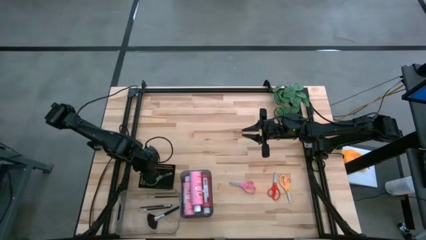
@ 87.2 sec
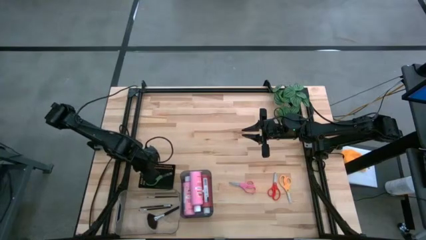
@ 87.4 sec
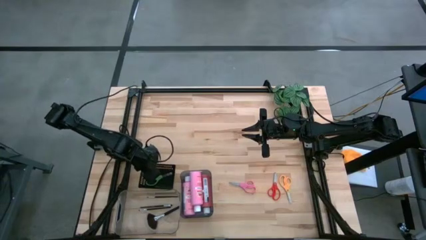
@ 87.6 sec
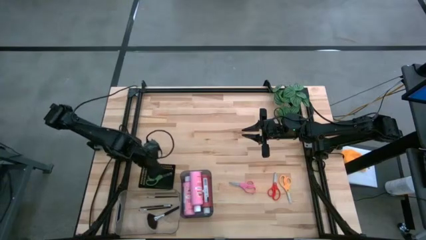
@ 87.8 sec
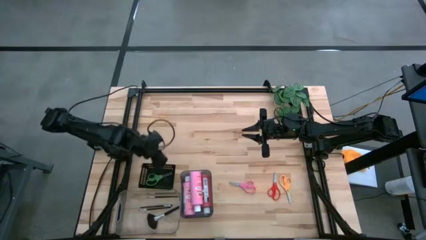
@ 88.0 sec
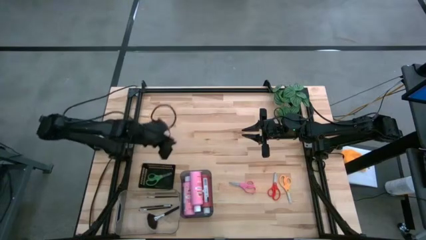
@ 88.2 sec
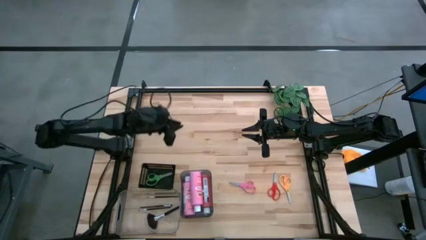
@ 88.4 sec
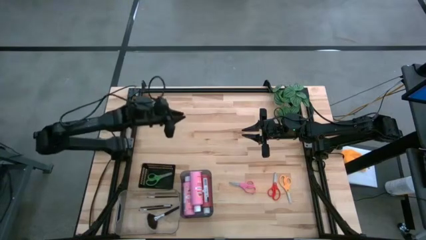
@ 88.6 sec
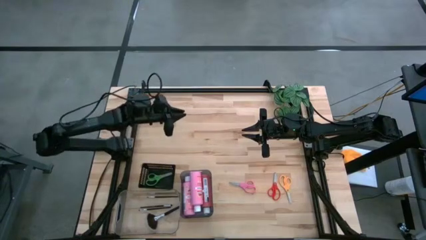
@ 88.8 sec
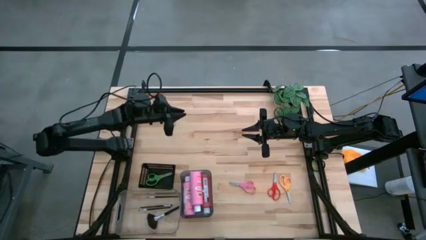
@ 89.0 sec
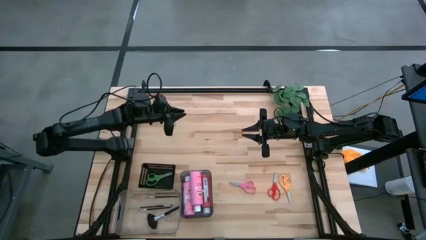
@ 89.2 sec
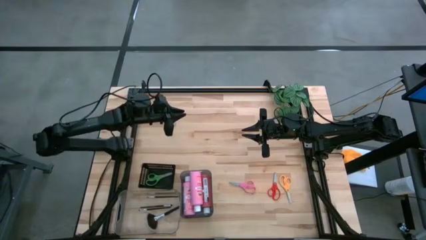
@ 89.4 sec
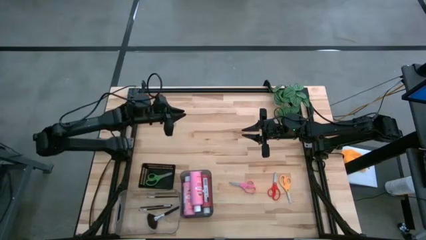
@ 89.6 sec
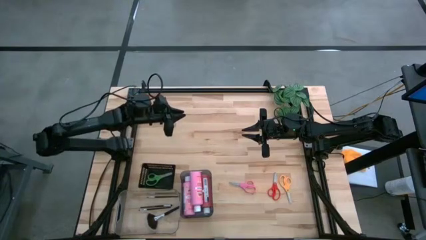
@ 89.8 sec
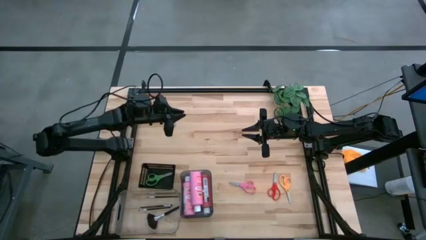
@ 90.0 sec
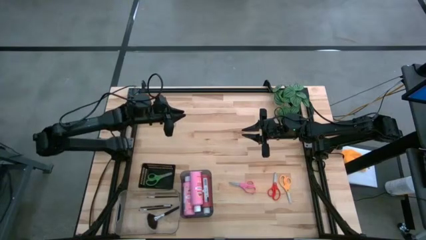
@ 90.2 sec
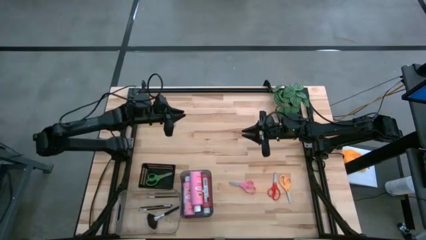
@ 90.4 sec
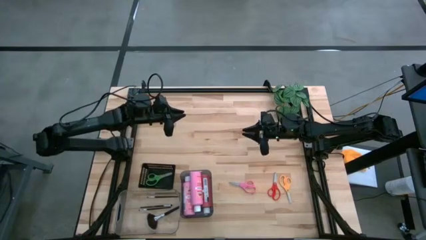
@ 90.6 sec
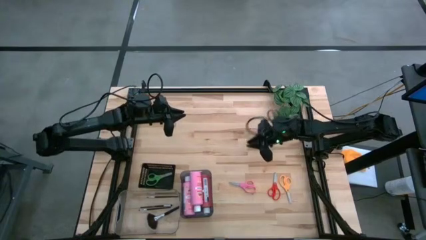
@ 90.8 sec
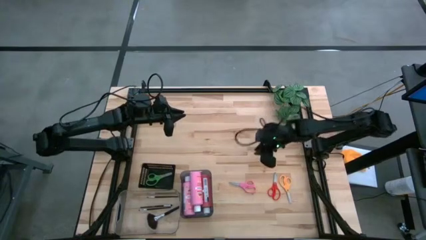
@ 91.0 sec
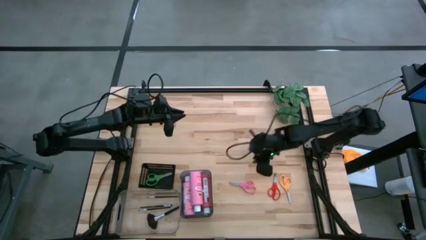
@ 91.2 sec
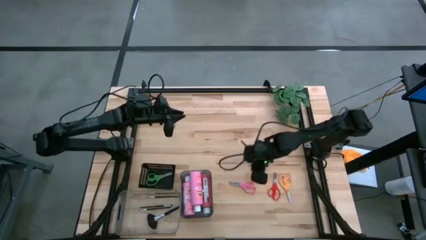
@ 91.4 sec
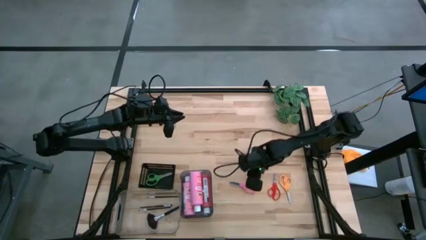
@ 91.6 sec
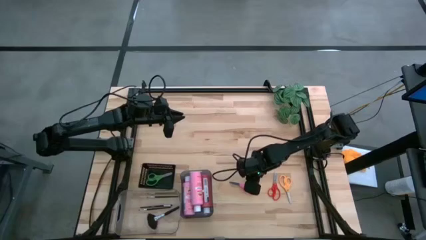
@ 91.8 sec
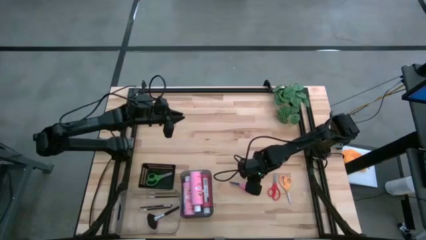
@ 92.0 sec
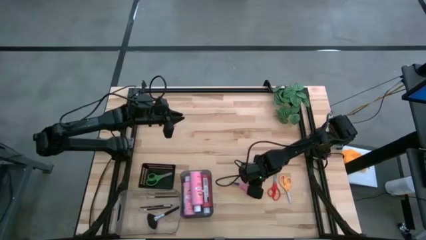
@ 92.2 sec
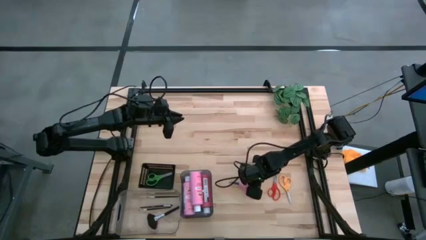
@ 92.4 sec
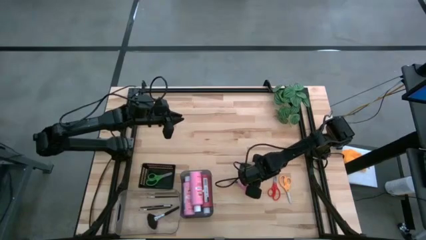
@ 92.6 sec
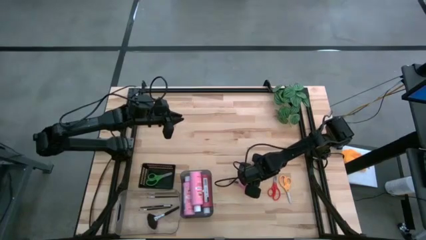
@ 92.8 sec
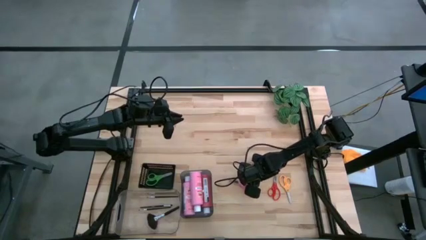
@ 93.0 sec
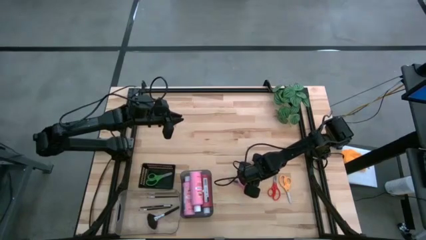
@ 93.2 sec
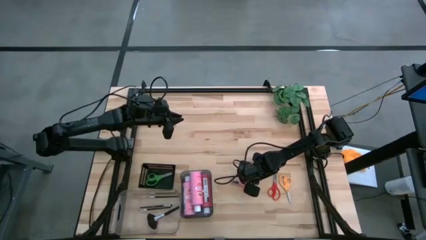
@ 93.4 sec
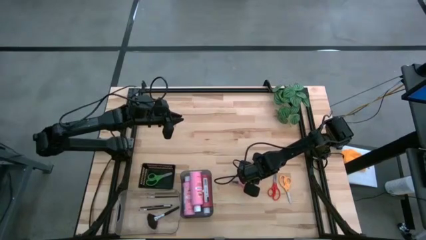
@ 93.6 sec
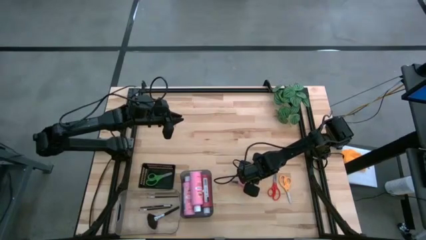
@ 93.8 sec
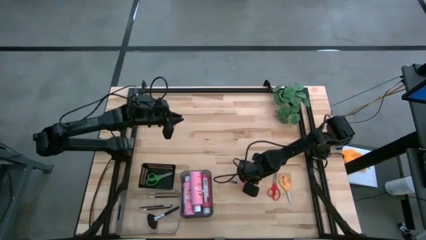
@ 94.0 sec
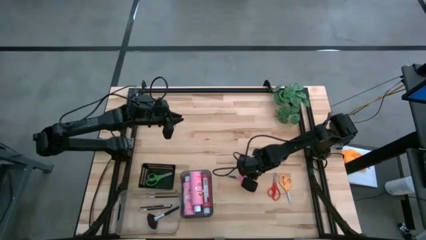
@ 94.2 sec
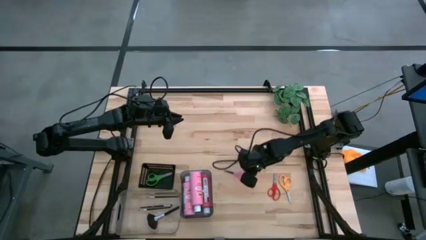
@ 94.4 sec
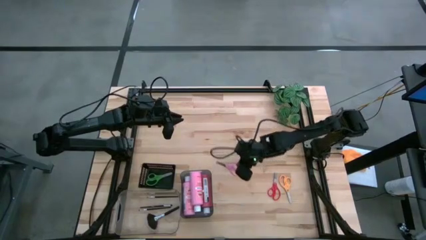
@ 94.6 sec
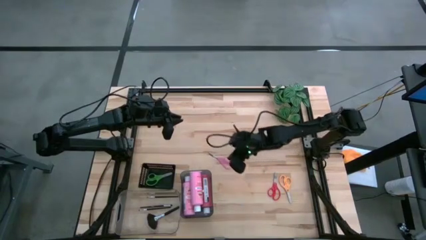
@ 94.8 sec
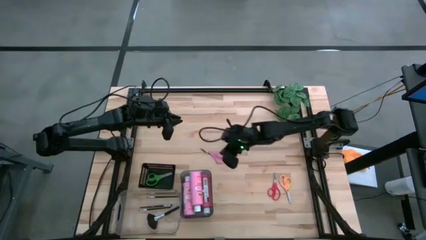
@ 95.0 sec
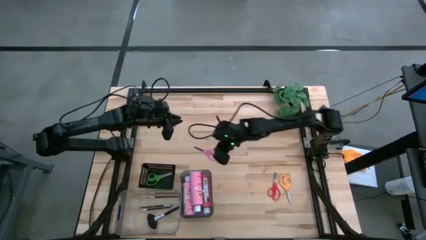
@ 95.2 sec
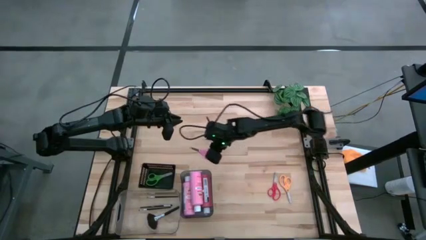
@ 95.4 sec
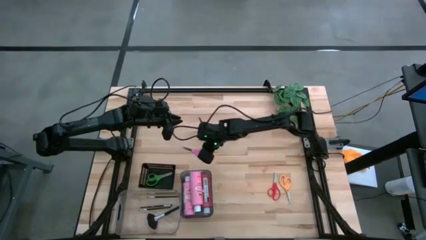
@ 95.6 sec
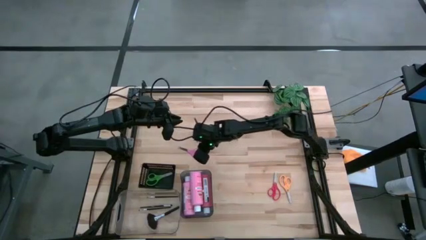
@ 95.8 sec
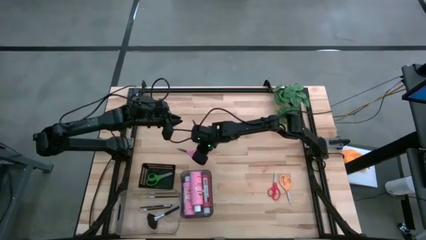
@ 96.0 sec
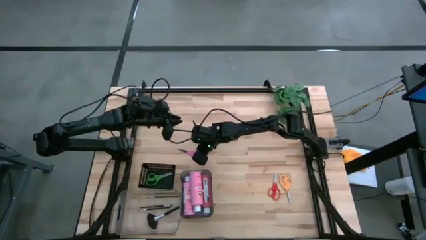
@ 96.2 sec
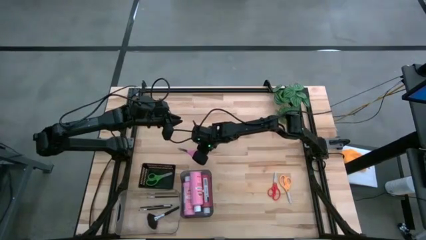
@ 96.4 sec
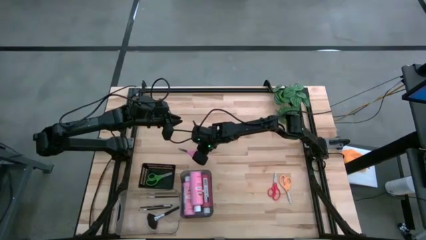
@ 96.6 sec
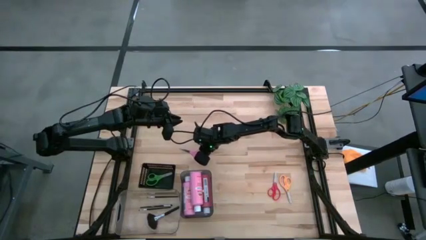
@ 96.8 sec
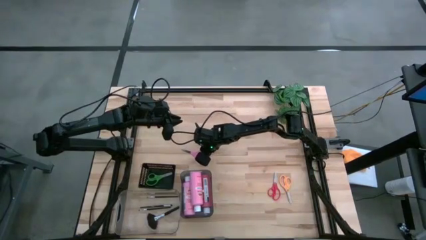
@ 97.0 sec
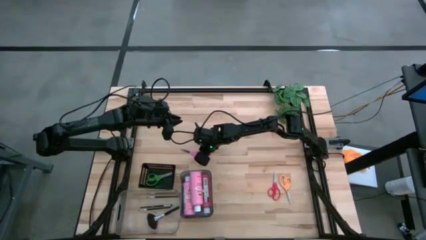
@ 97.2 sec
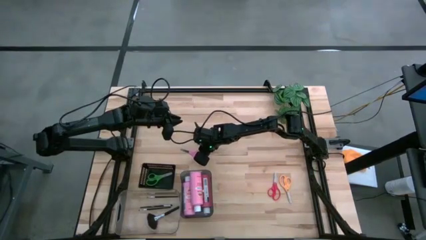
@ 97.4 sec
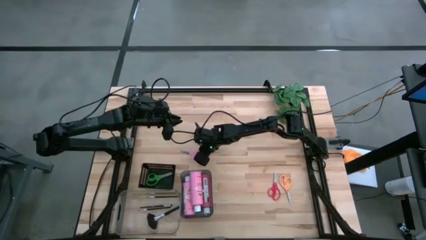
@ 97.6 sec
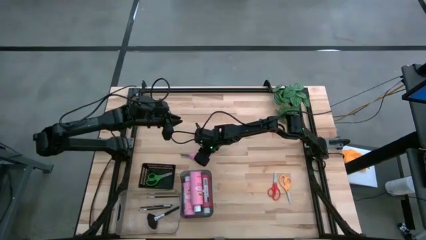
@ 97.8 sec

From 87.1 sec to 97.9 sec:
Task: Pick & Place Paint Supplies
Put the pink scissors into the black bin

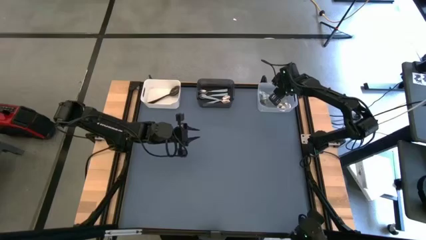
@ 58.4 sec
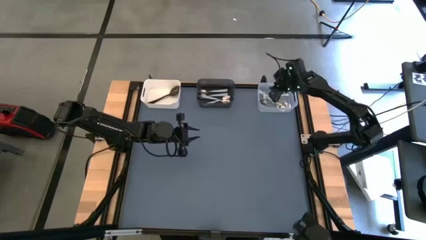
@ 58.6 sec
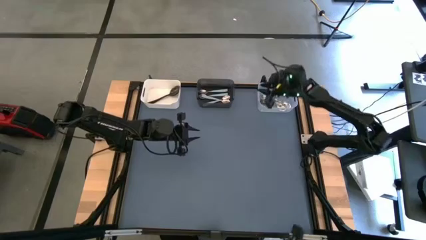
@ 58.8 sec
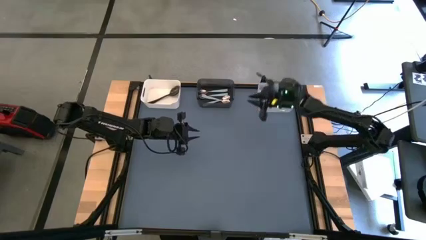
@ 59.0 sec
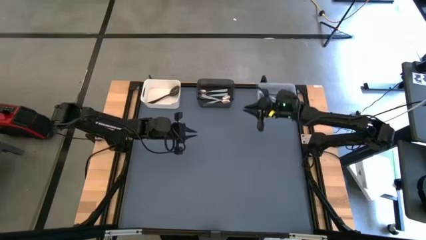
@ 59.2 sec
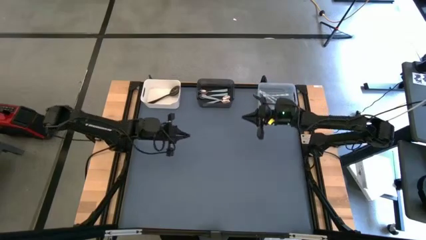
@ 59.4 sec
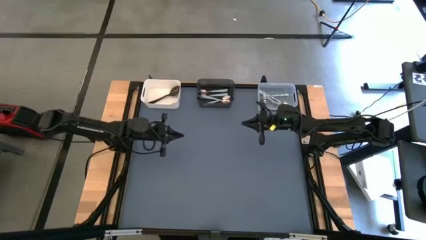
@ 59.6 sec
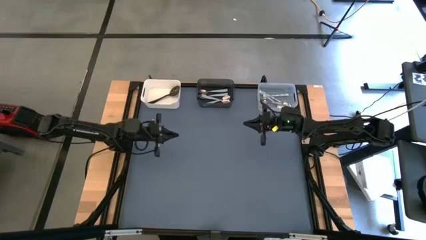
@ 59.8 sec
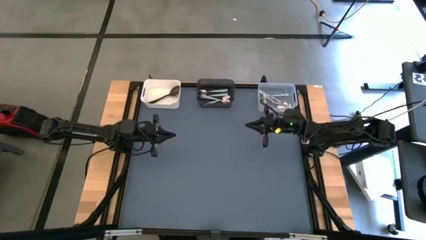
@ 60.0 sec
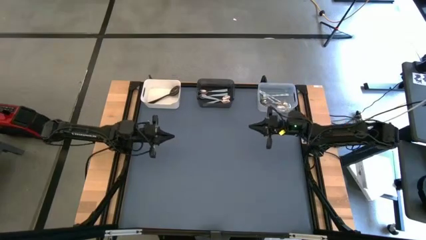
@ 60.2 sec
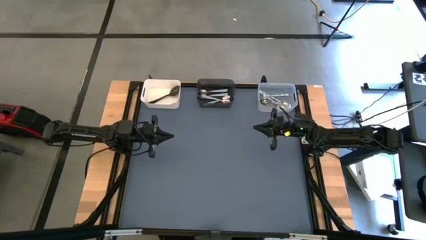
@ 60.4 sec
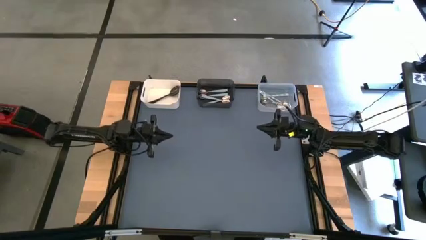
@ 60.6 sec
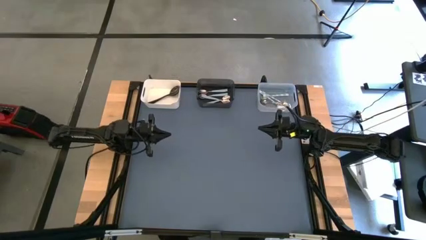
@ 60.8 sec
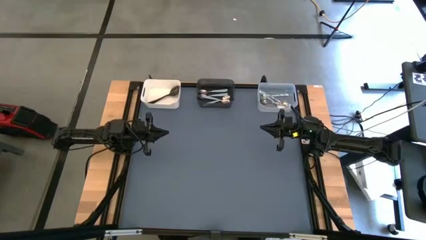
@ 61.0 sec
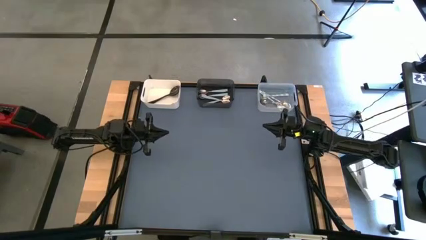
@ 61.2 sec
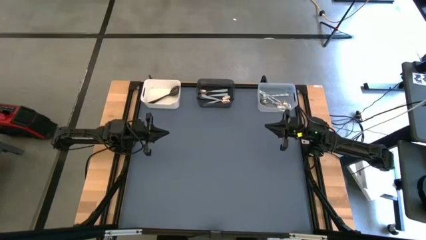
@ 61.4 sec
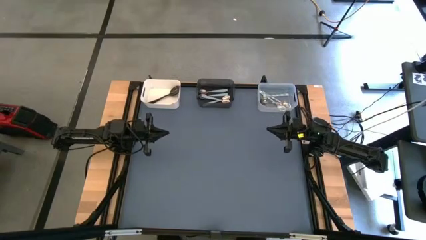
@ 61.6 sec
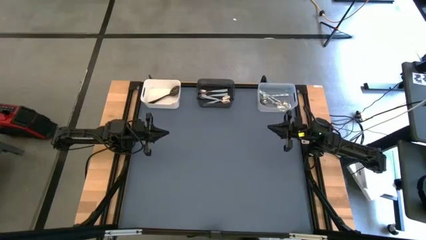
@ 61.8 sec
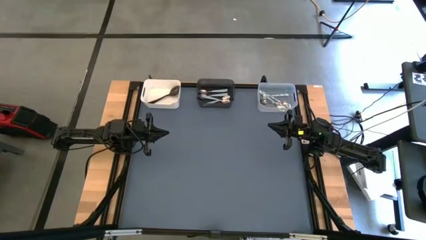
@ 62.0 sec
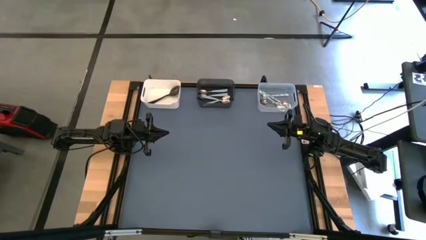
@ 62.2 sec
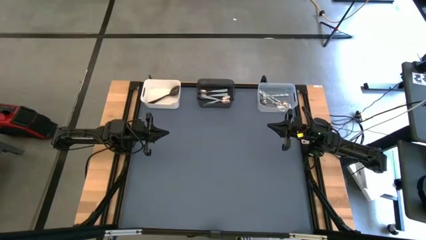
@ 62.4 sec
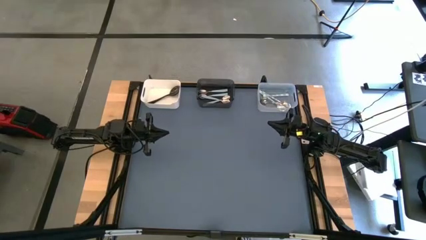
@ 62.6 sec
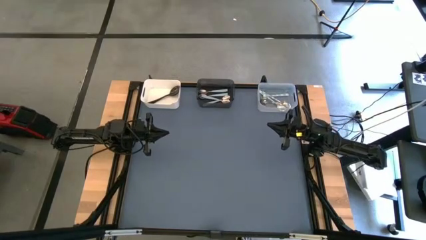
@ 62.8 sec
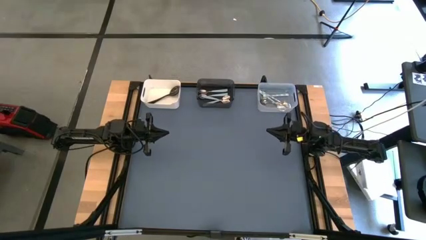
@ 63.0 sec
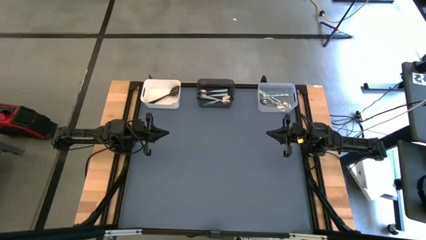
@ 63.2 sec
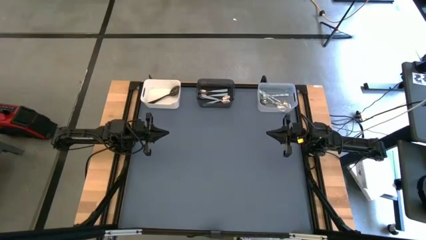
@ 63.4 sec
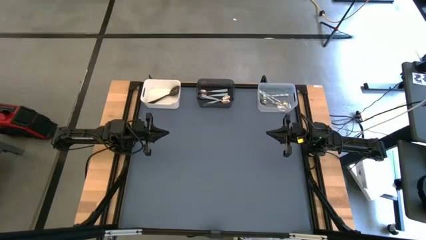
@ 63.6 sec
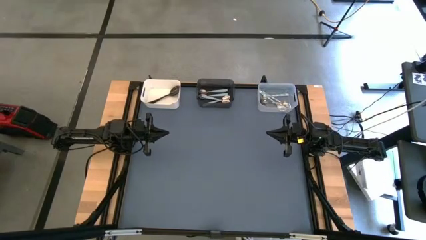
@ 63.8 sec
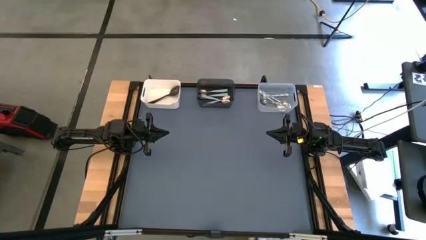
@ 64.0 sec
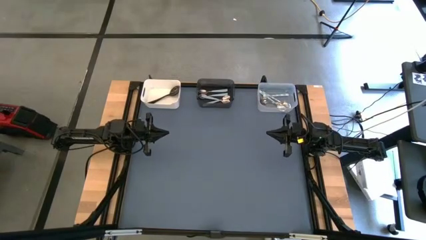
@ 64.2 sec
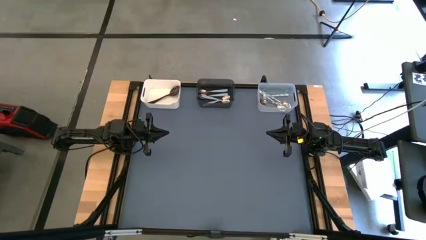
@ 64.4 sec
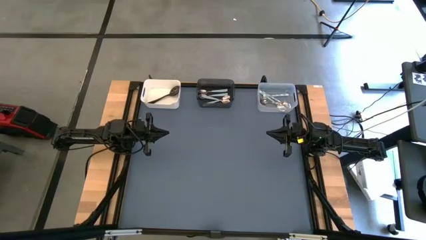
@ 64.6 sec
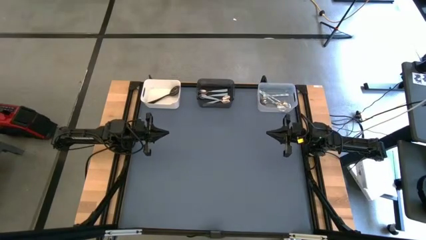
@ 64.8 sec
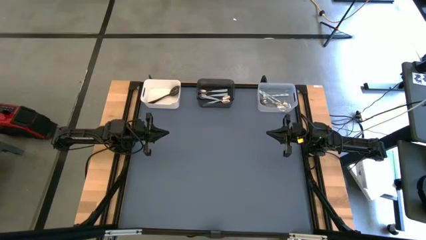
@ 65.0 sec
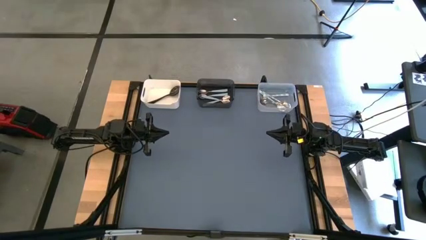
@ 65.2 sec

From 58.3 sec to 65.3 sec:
Task: Sort silverware by color (type)
Return to Home Position
